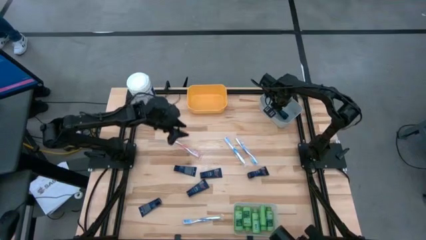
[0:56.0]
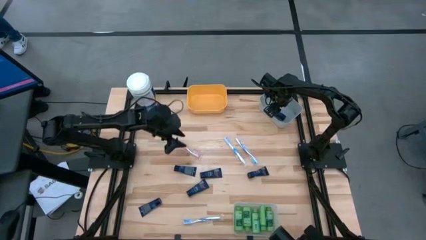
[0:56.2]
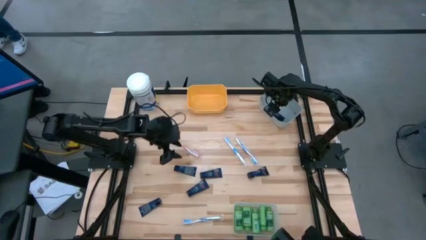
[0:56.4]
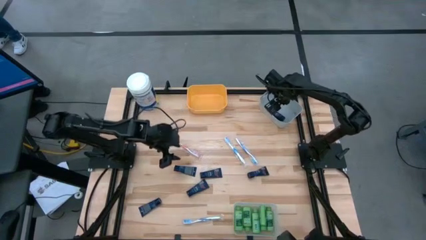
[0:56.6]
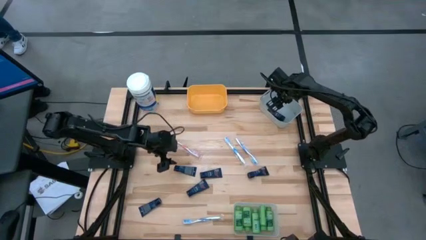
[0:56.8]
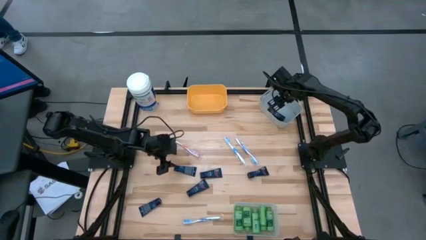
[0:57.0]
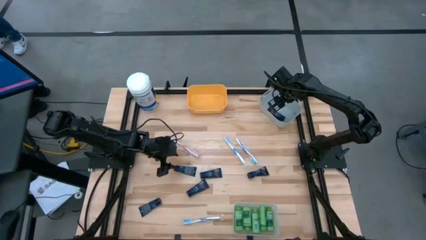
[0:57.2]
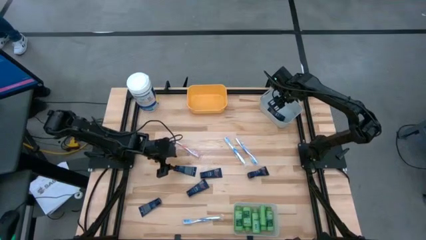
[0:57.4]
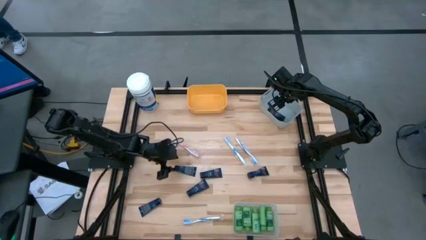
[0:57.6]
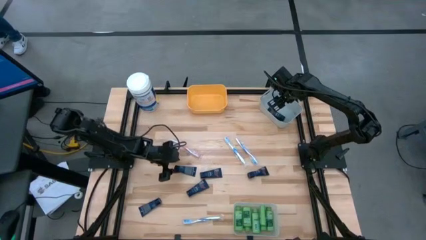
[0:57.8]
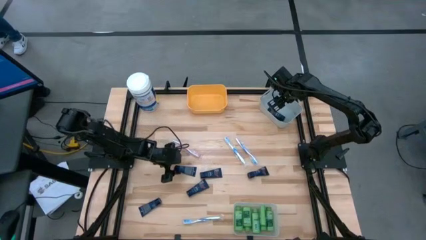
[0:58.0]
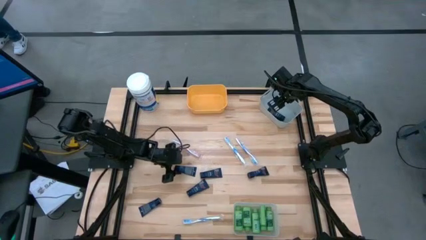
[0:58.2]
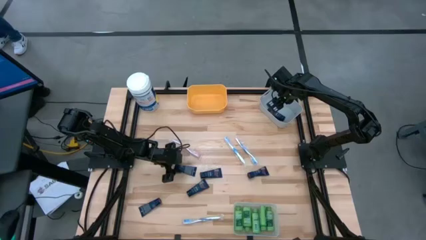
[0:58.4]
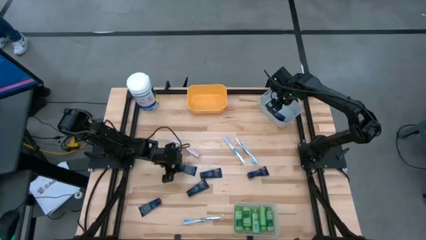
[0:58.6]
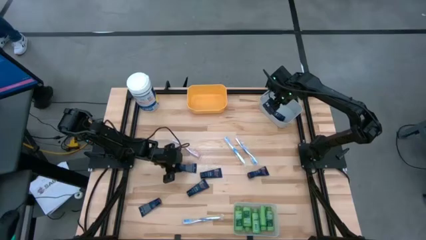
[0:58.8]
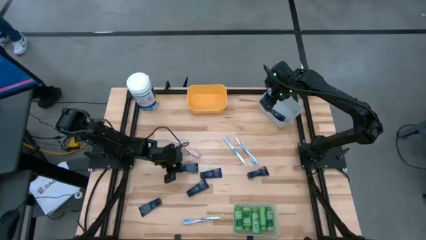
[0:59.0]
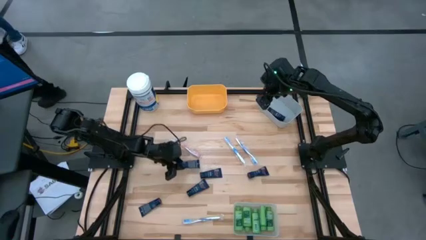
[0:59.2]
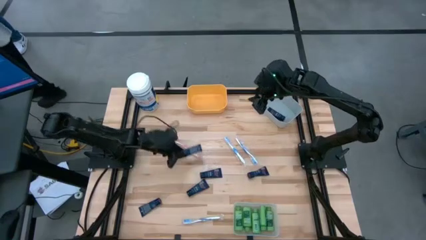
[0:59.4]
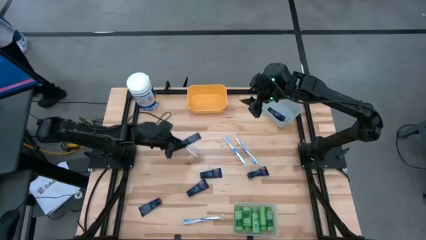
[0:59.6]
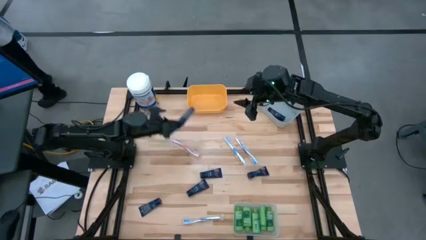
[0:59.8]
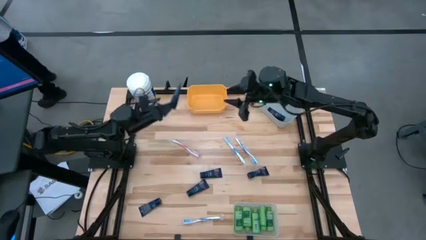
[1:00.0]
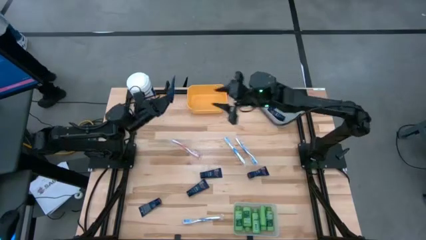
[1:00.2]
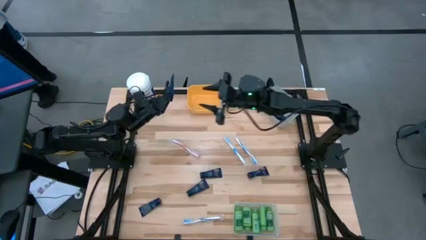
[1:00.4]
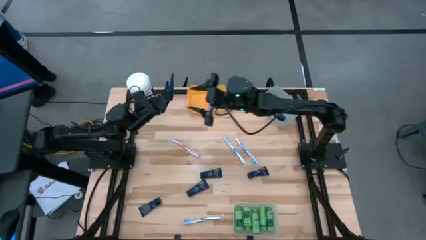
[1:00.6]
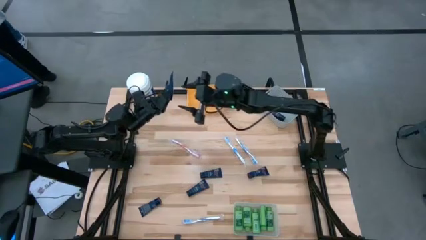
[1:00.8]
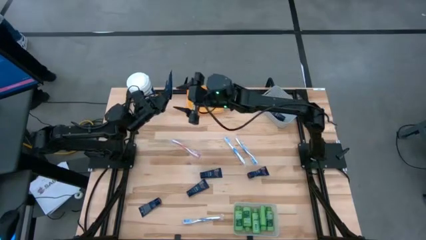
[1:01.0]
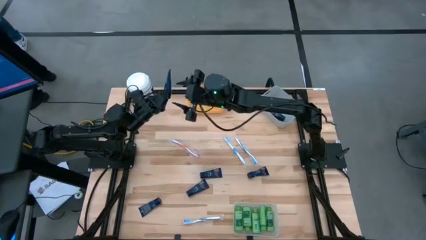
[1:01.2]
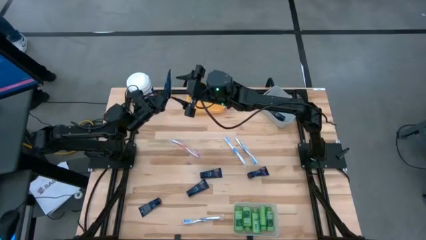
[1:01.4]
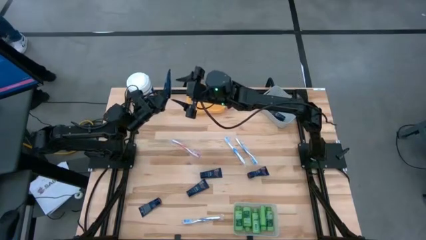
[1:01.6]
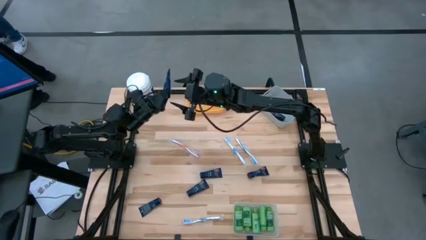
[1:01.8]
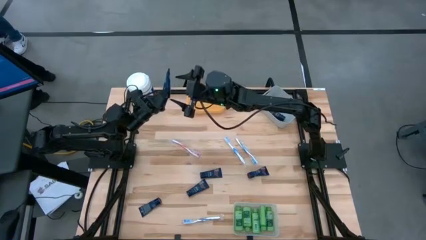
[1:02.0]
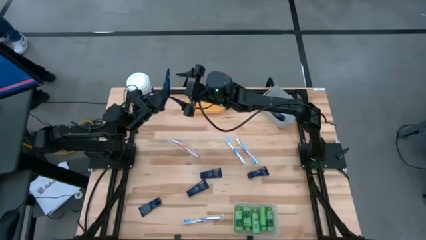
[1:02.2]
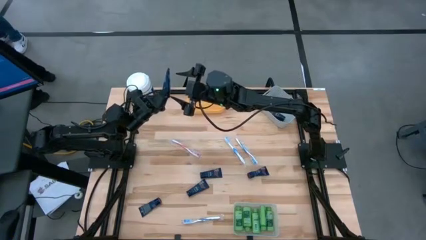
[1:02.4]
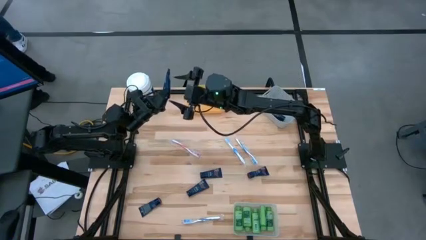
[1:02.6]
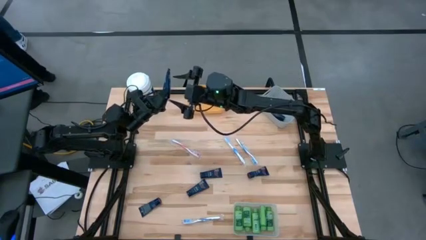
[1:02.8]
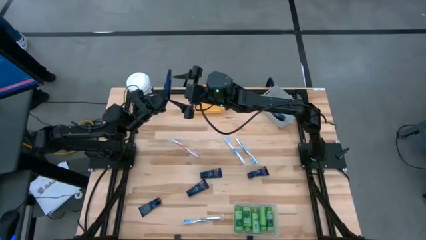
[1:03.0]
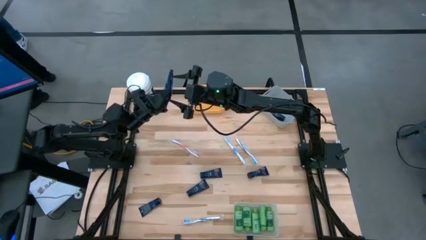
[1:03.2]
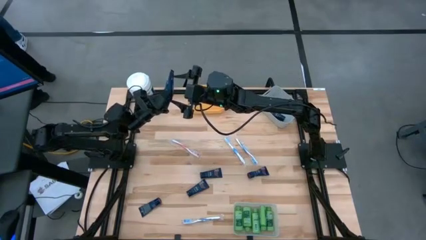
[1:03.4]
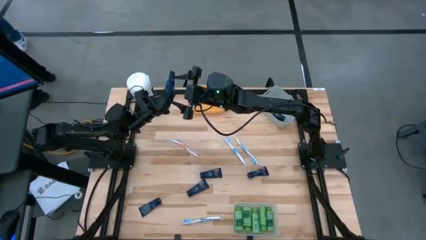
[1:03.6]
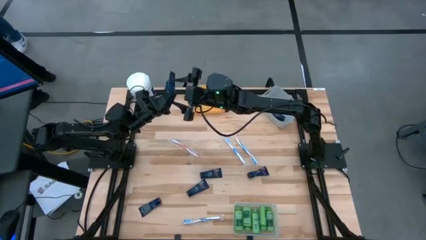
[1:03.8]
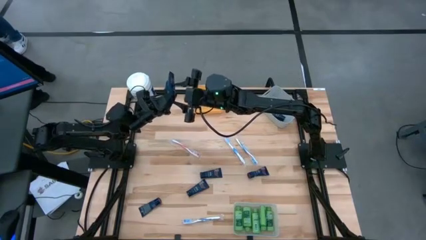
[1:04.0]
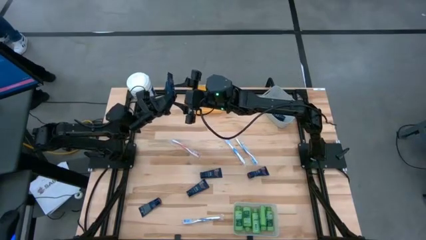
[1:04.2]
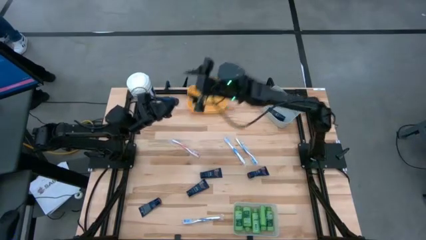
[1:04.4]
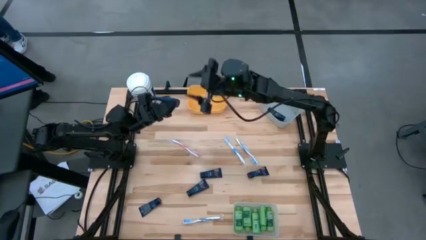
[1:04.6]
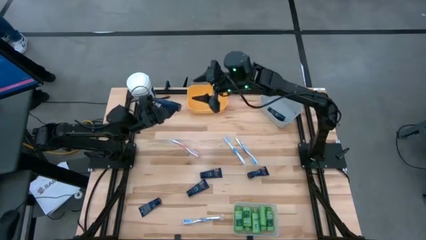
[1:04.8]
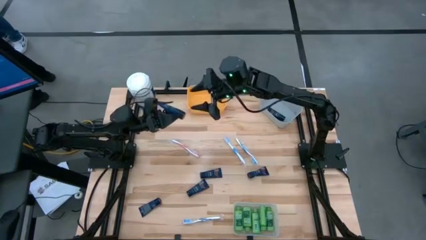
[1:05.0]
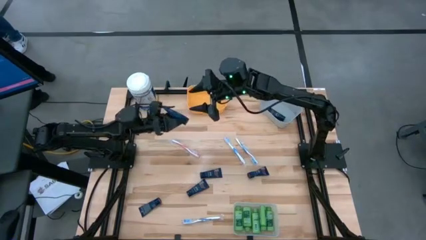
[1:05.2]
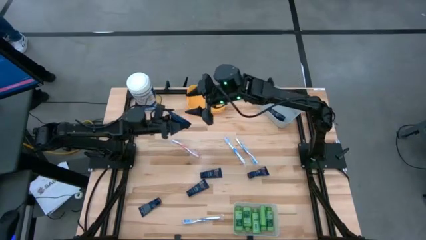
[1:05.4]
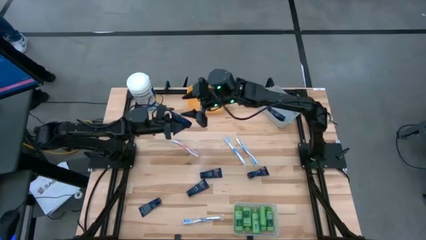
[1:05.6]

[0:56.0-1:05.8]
Task: Pick & Place Travel size toiletries
Put the blue shaving cream into the grey bin

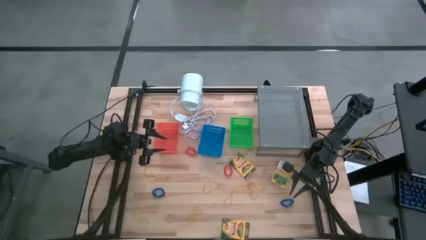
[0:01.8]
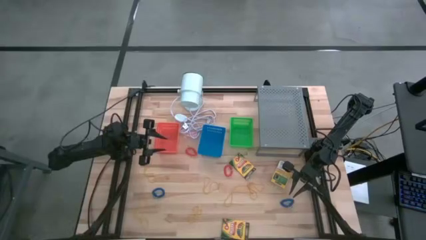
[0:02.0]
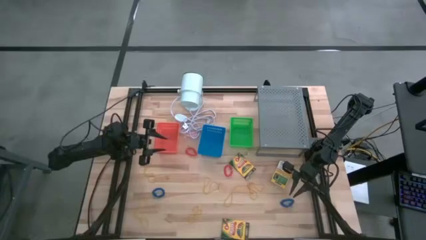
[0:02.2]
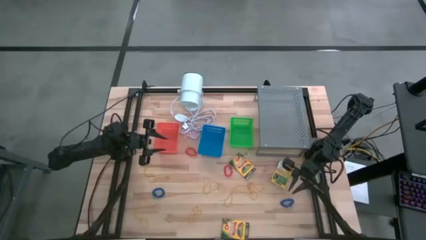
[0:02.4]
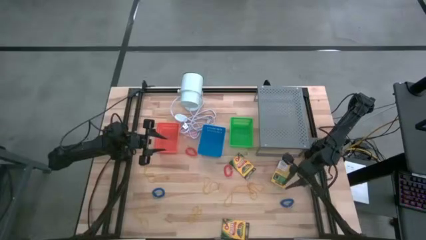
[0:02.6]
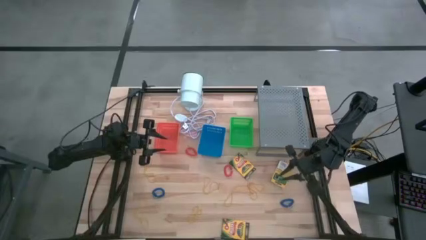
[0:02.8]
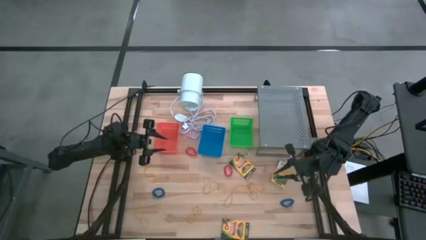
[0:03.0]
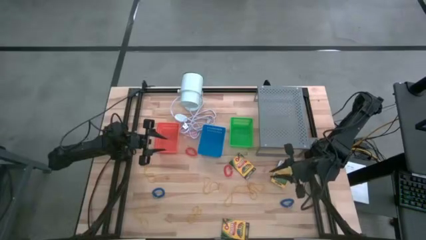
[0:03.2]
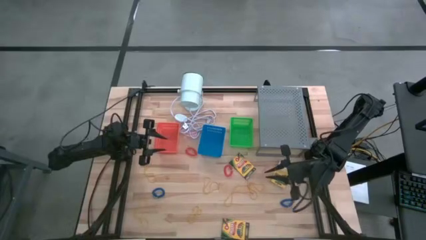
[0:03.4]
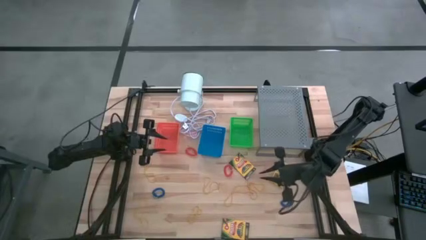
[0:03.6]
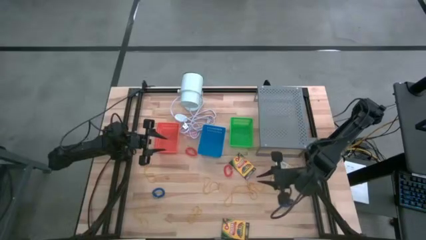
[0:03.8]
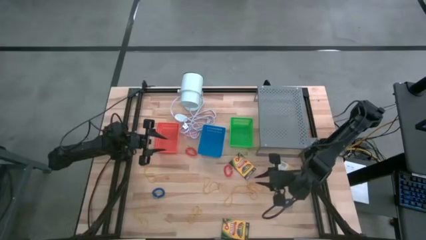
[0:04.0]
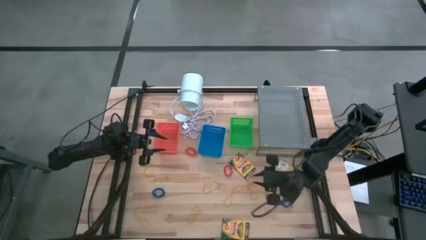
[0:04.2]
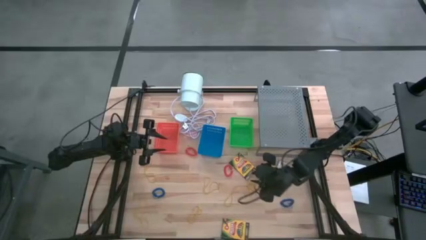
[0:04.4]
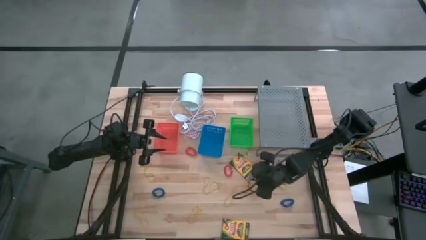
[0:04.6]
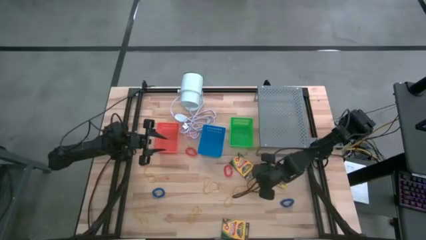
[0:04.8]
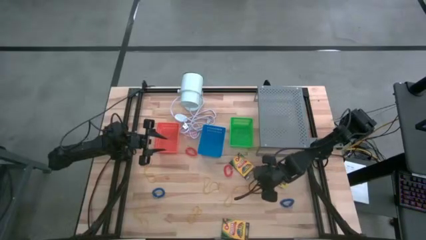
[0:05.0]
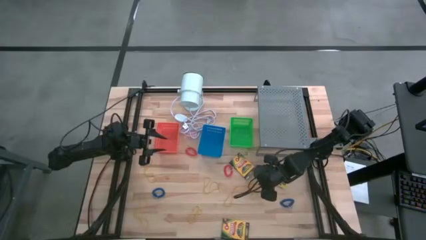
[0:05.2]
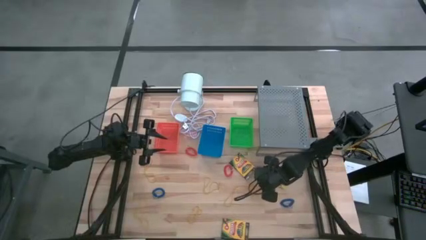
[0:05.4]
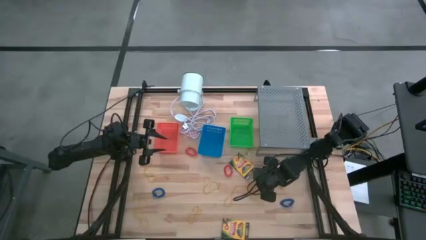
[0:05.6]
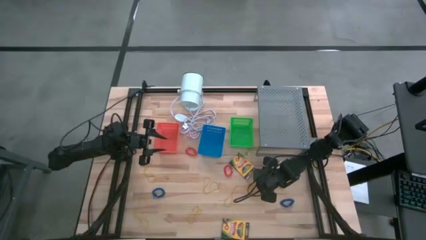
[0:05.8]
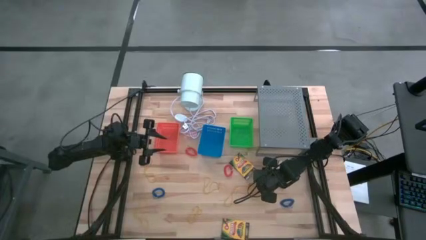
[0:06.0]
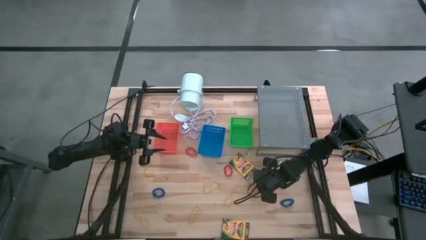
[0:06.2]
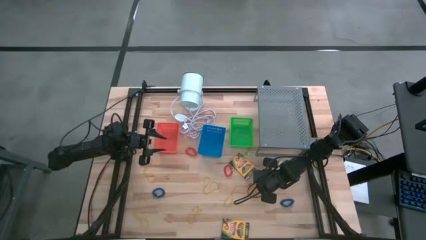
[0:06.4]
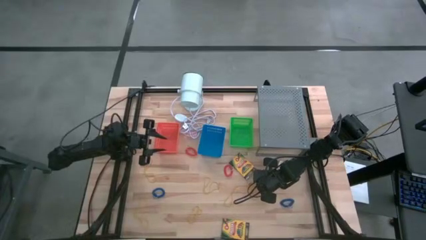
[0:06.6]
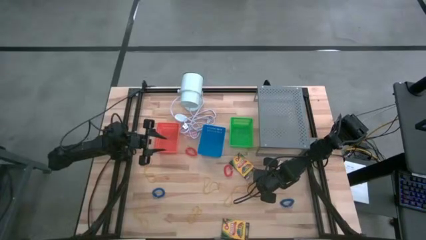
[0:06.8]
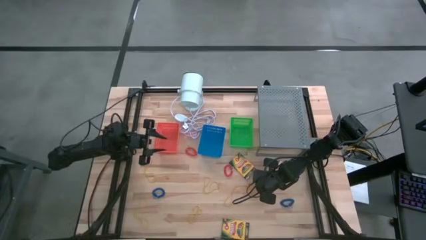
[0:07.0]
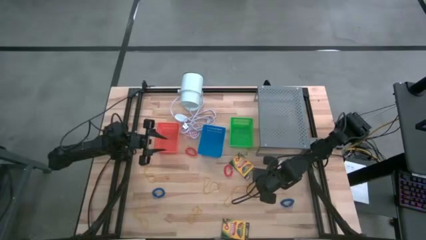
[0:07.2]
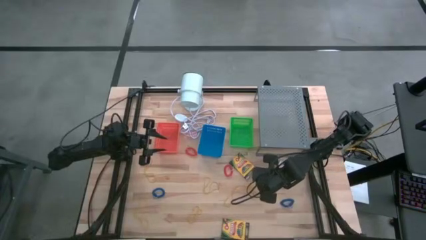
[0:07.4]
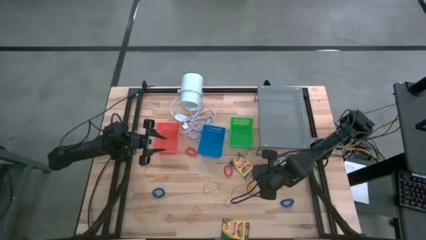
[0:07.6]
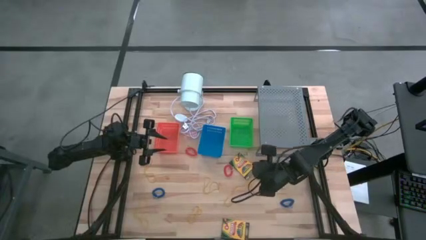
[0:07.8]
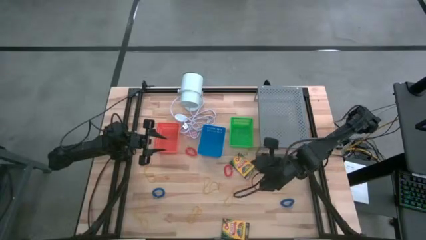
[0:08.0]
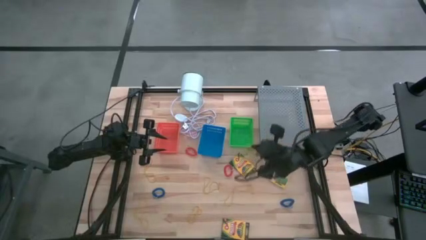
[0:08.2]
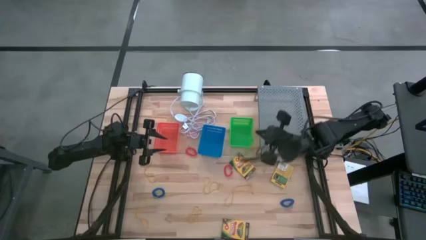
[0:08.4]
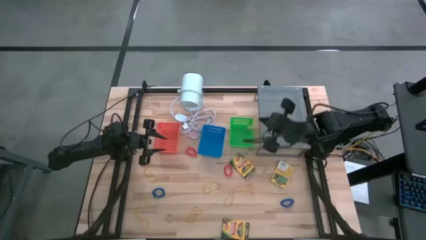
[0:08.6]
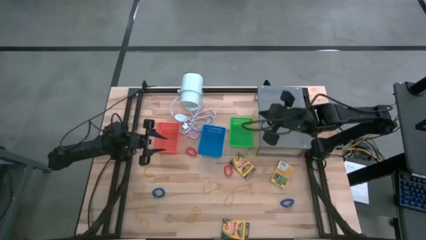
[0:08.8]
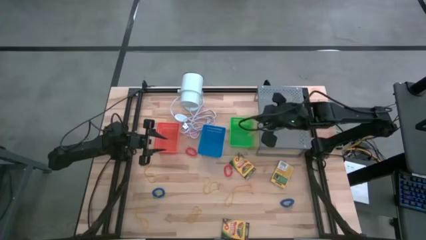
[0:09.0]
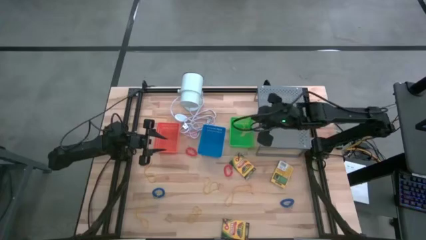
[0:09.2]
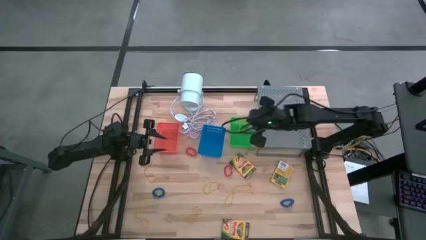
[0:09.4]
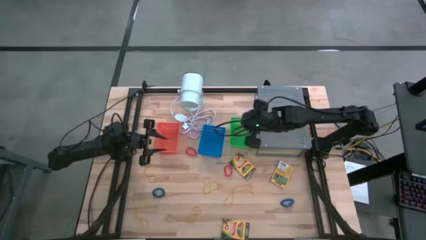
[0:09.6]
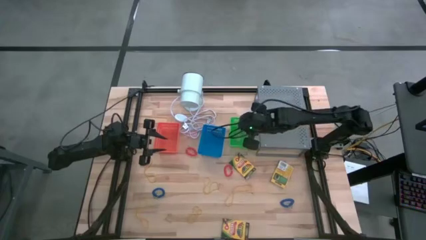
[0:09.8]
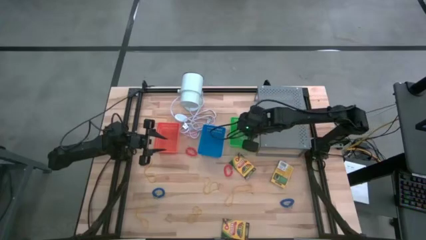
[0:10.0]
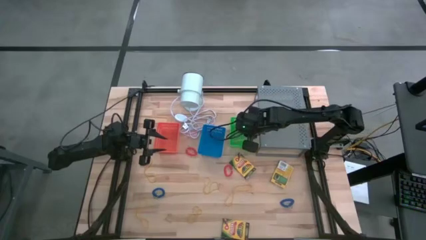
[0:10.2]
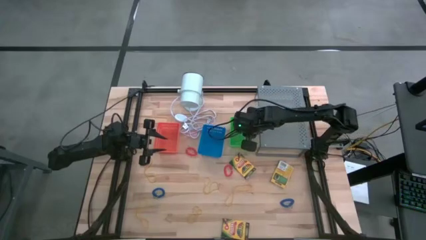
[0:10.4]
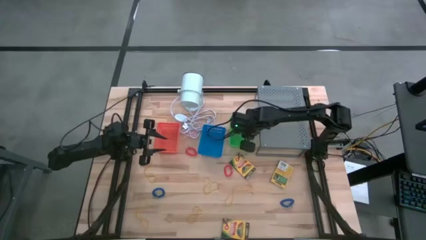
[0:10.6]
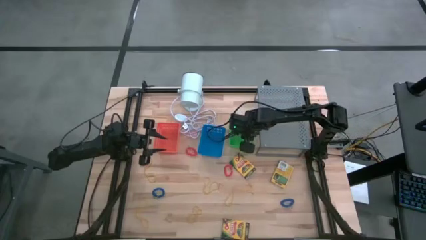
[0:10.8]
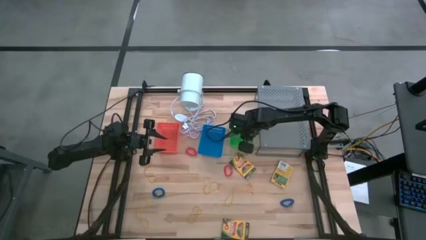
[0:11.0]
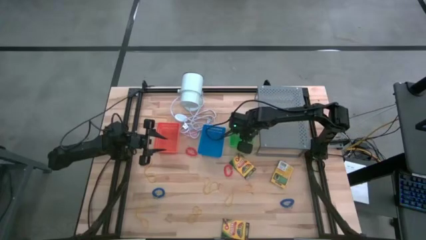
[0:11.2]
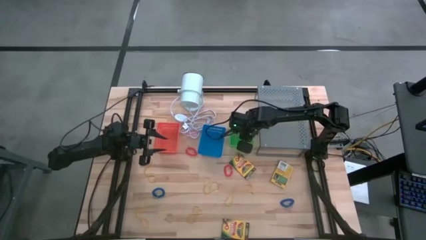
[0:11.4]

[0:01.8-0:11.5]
Task: Pick & Place Office Desk Supplies
Put the yellow rubber band into the green bin
